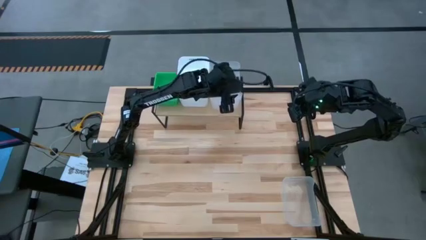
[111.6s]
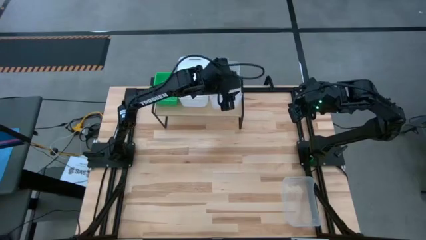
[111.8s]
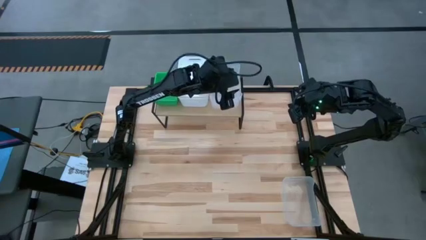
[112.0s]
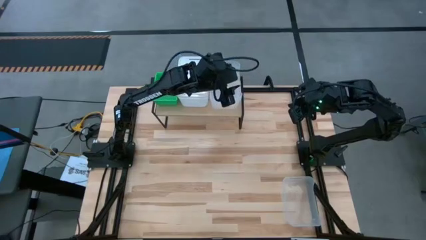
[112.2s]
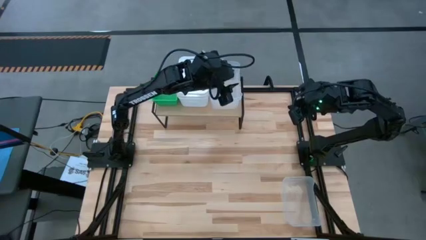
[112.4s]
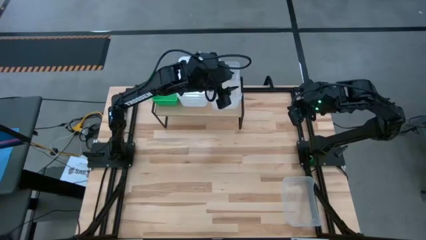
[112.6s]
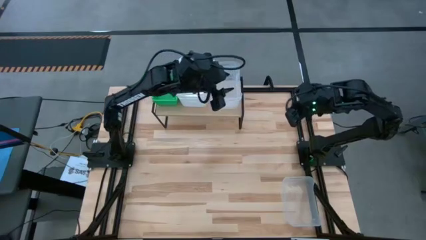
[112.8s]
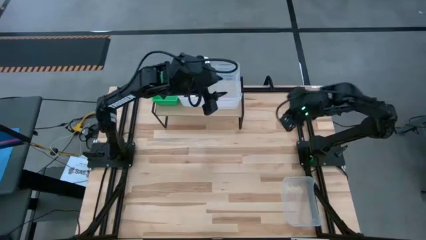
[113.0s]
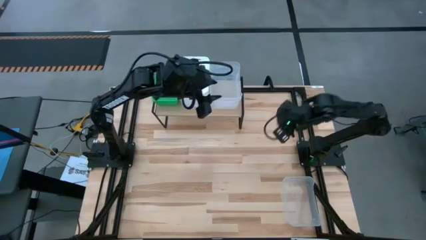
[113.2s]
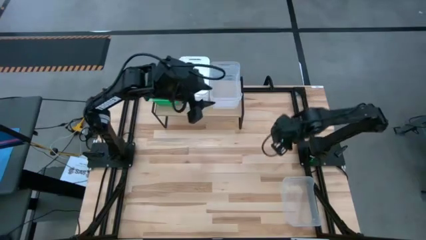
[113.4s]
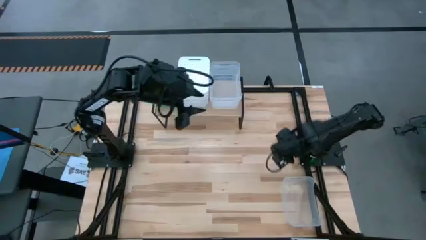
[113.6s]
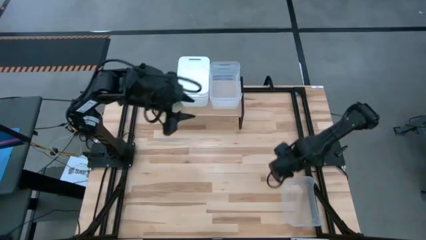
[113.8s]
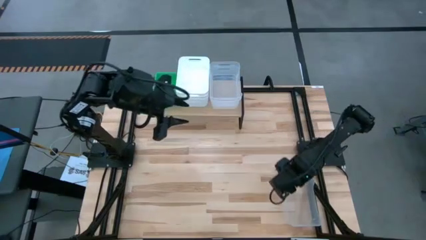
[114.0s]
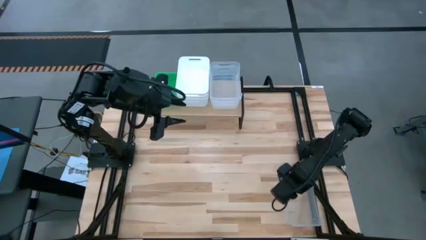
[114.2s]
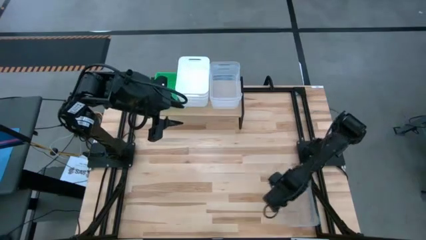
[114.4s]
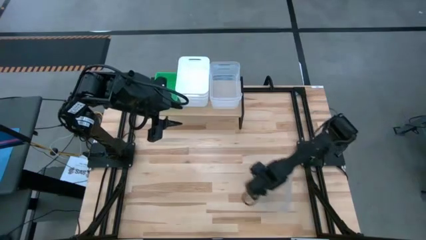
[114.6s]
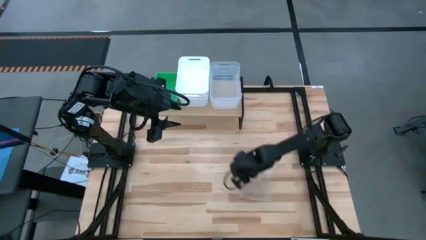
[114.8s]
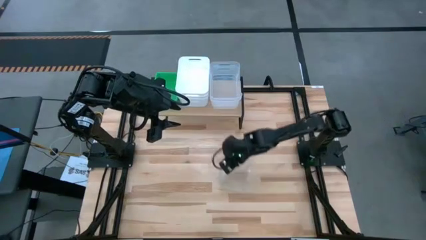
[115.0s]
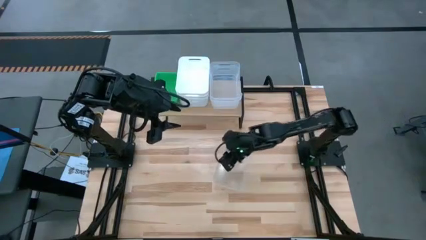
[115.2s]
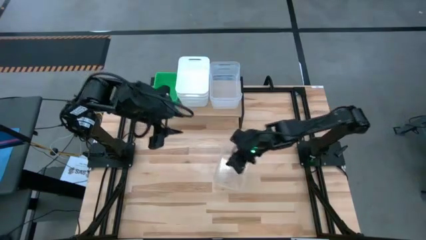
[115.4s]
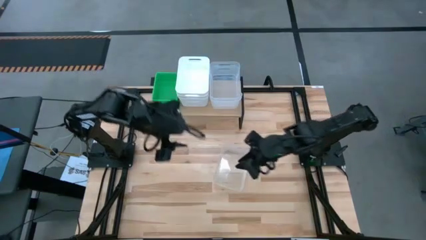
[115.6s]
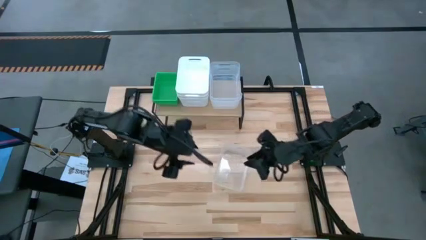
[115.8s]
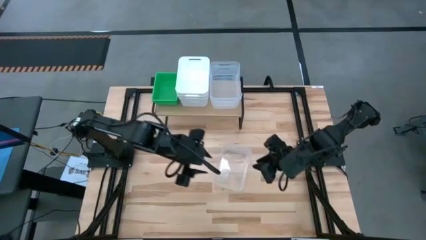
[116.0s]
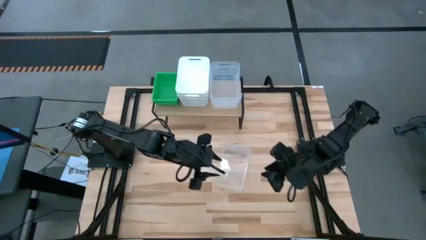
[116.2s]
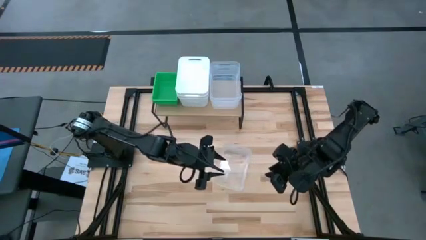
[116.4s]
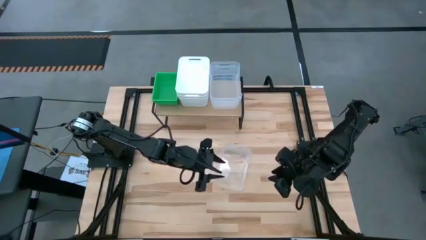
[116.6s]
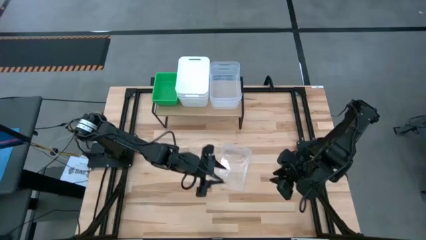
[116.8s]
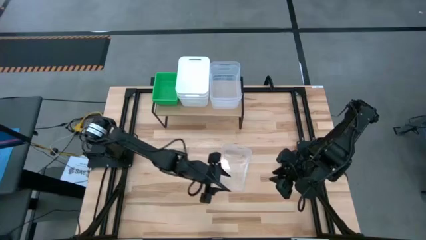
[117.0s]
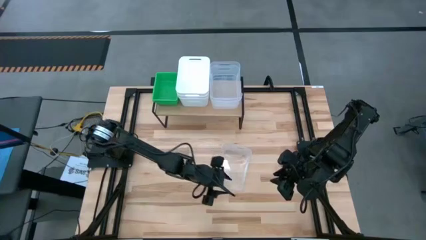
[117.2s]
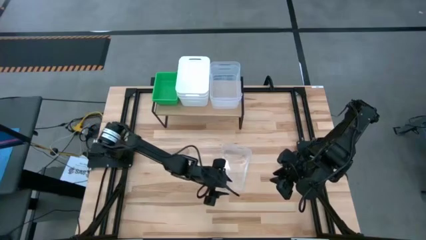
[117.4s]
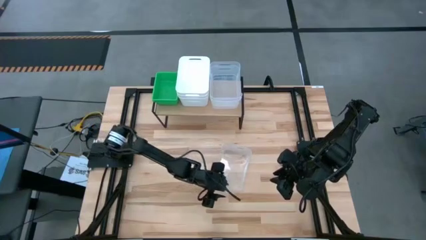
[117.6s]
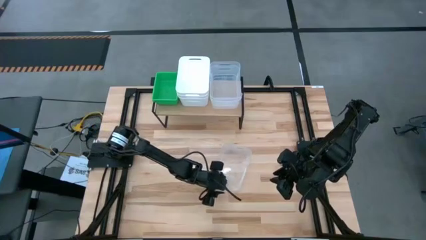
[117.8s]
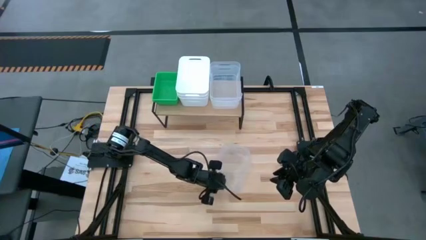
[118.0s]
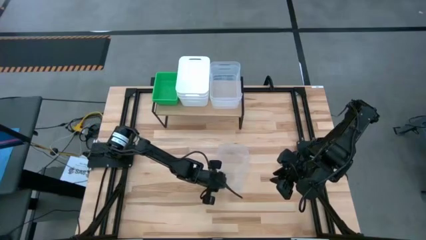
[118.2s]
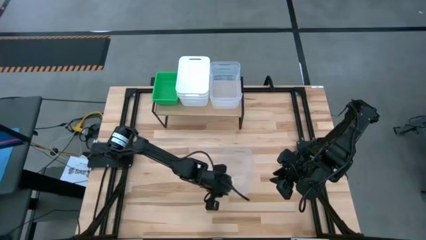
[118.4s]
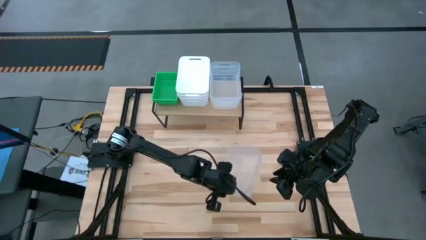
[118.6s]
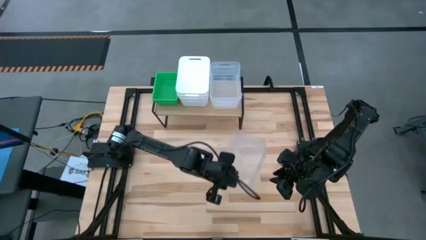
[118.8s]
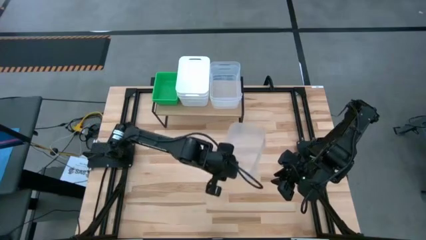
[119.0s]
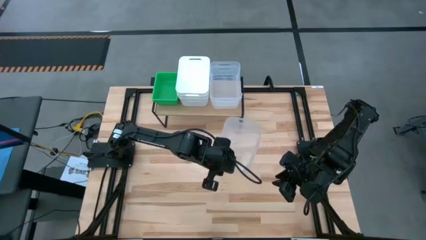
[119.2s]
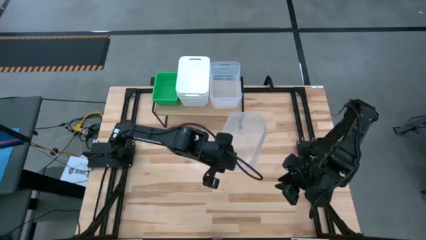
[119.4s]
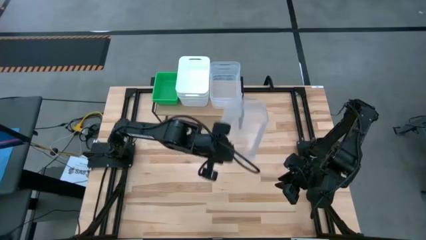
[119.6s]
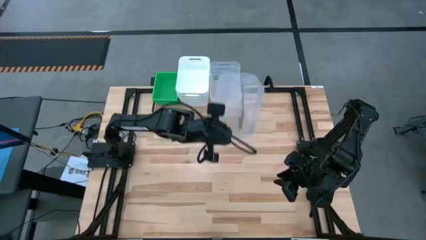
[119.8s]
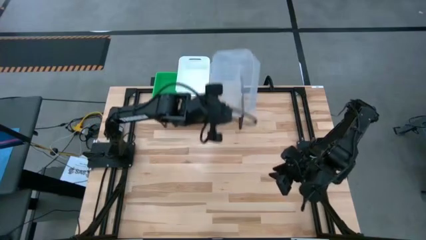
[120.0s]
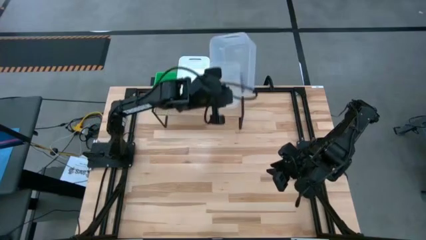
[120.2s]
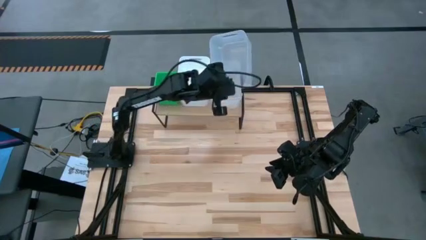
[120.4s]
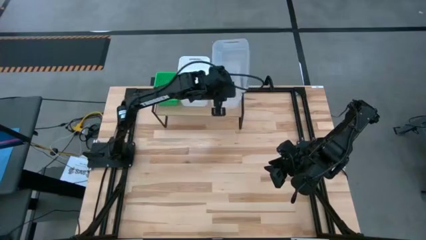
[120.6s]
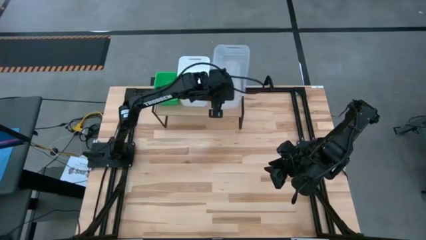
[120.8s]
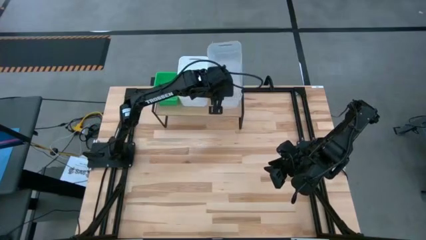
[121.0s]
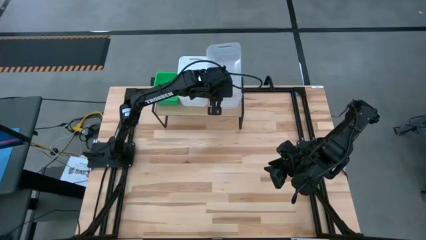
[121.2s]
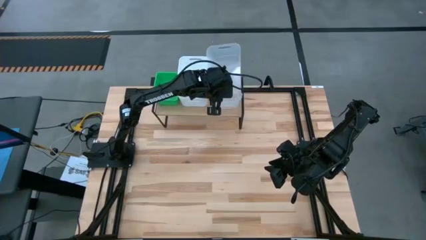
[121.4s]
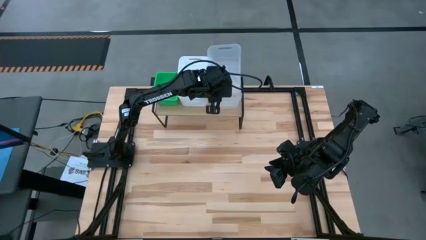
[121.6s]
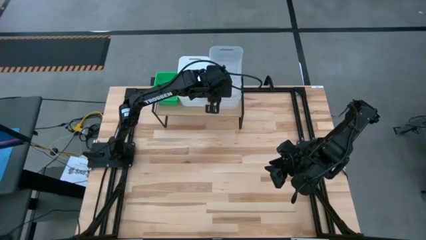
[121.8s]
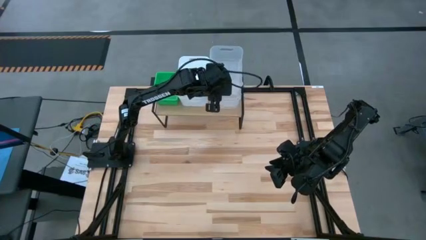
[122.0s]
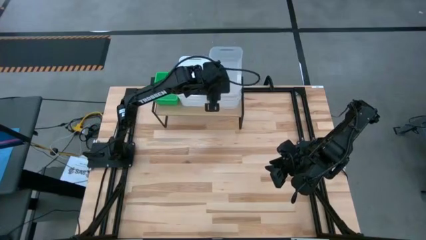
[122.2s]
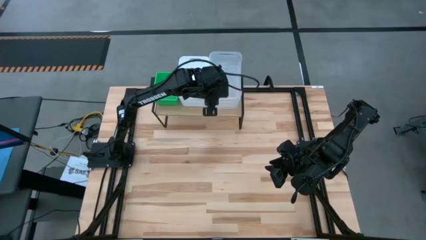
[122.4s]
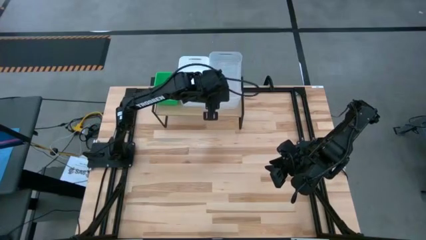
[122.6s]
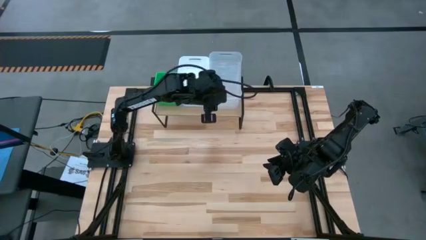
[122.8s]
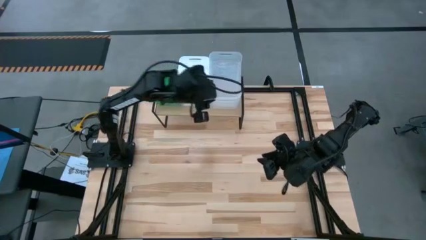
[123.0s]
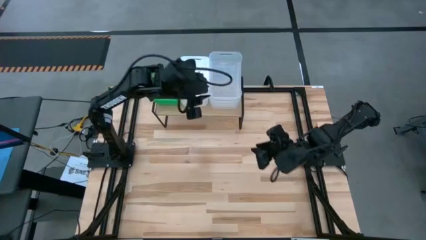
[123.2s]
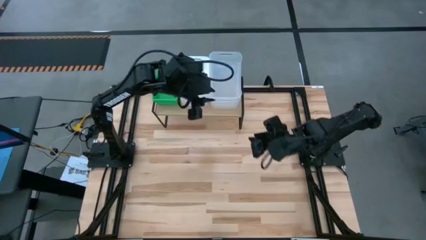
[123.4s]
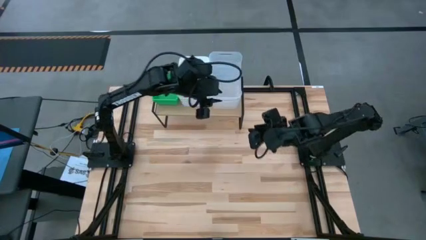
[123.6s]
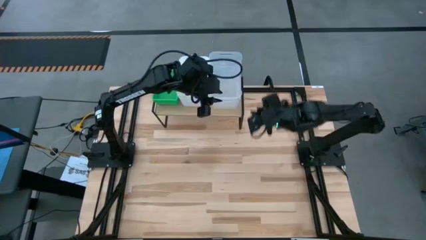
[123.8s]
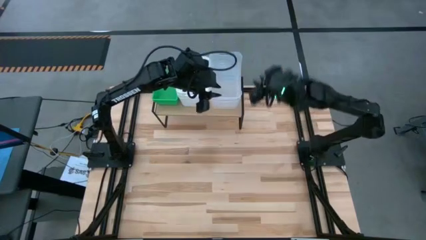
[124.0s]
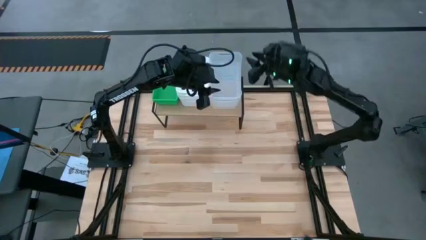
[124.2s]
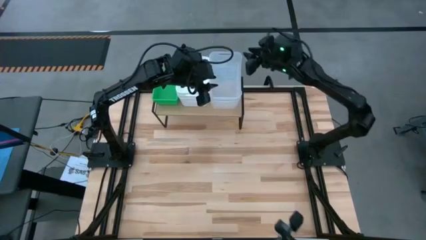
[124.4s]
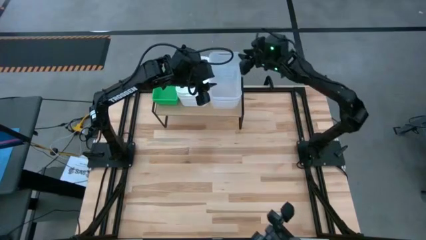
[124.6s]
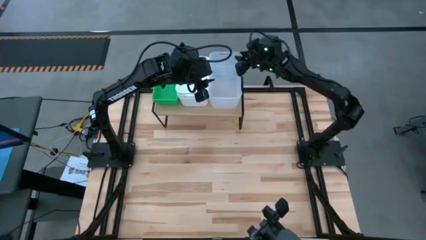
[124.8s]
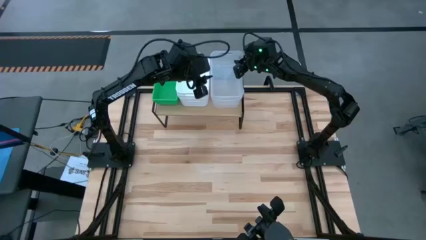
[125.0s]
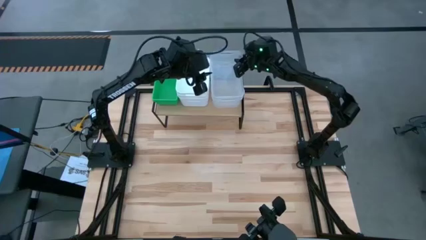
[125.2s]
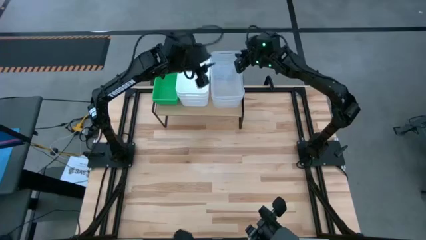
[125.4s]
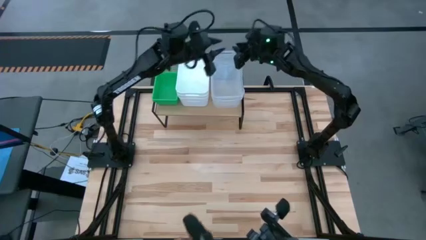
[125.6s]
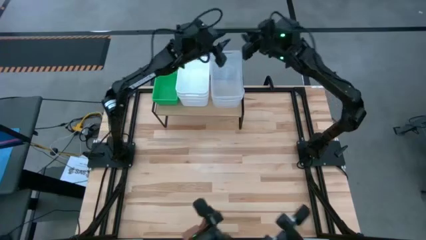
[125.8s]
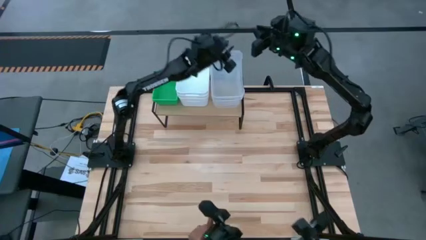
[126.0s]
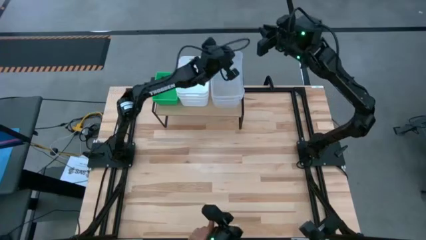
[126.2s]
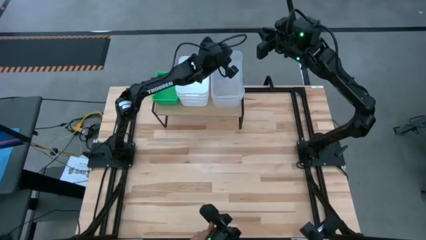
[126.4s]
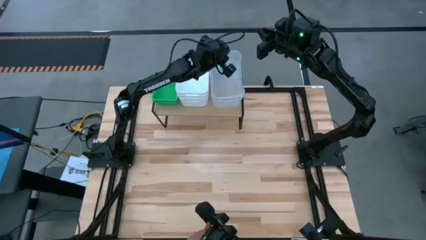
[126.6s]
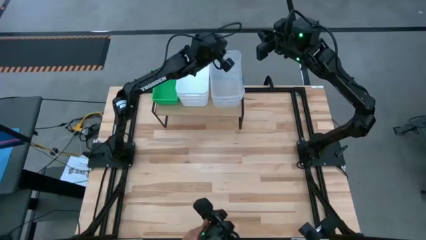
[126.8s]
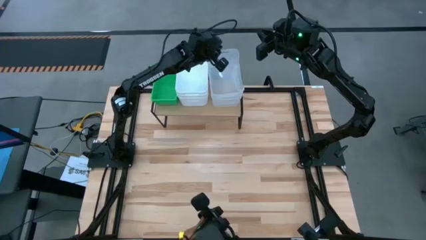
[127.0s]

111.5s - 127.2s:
Task: Stack baskets on shelf by color
Stack the transparent bin on top of the transparent bin on the shelf

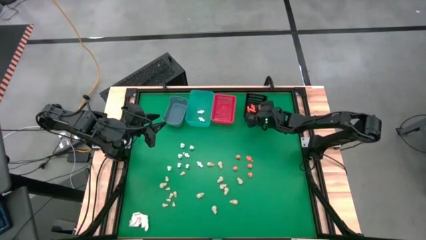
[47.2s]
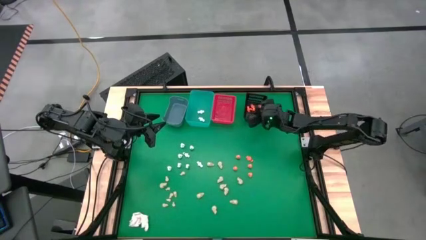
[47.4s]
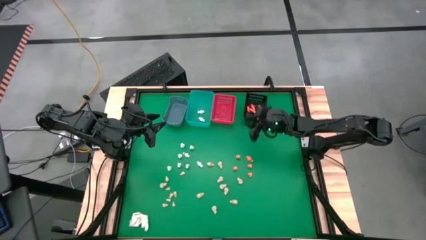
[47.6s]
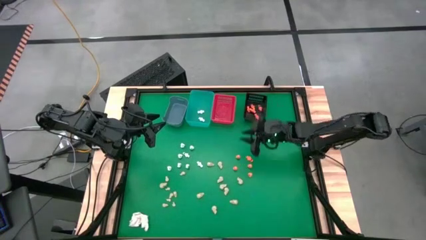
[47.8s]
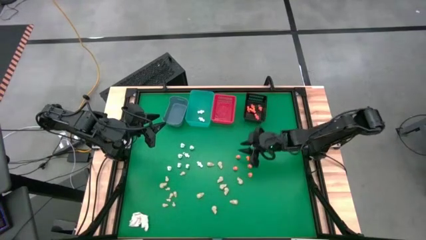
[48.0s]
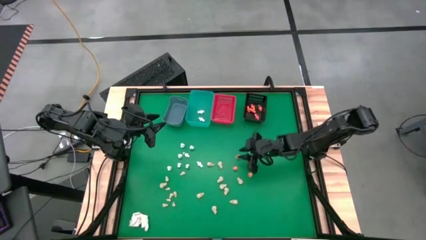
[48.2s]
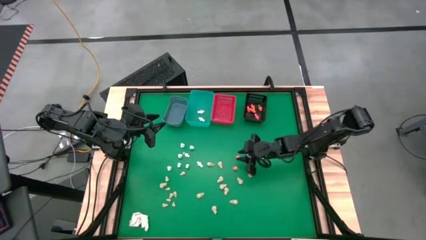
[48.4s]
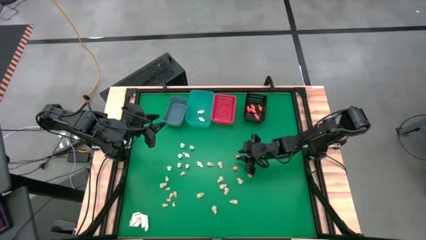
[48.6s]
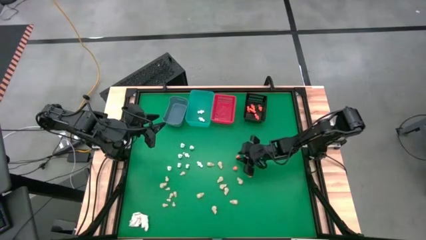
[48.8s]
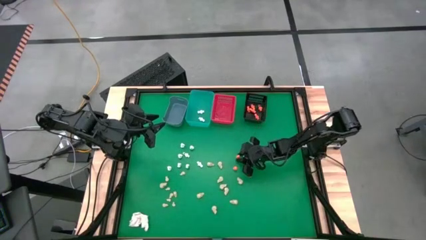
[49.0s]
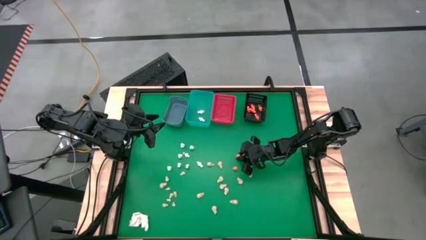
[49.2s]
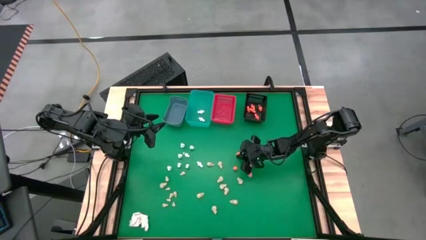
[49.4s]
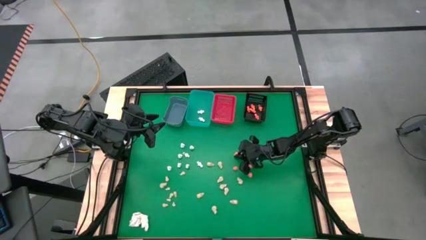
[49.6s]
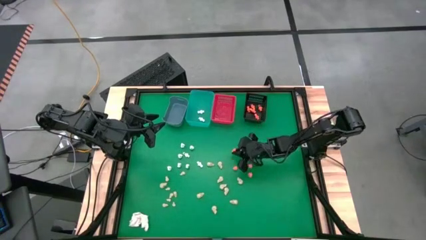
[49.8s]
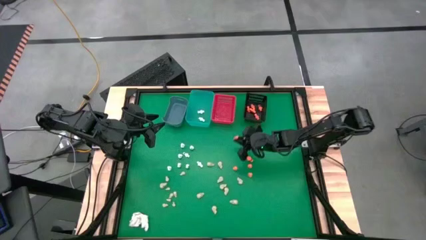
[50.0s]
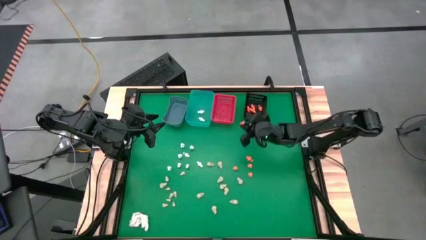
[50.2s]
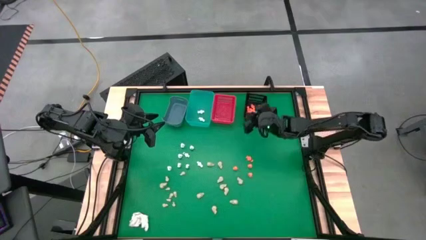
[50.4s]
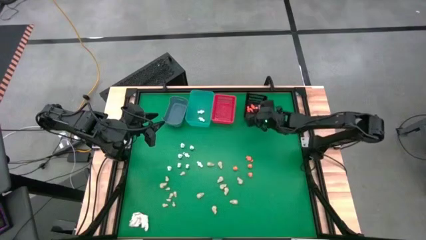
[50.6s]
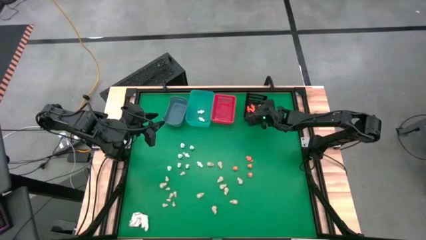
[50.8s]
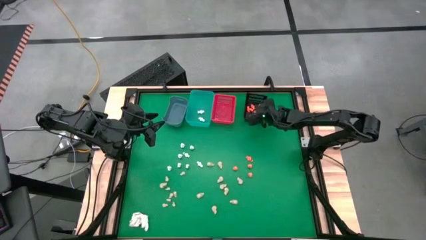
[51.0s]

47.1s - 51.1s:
Task: Sort Halloween decoration
Put the orange skeleton toy into the black bin
